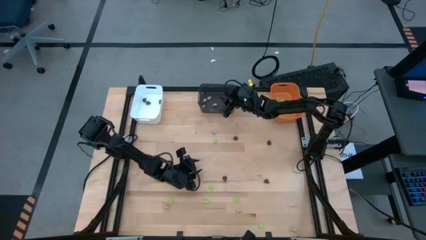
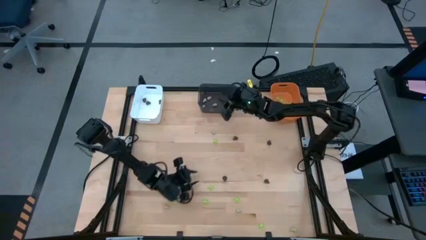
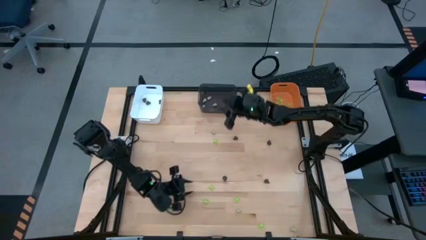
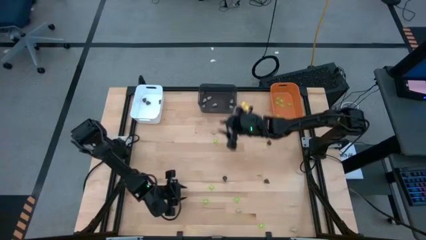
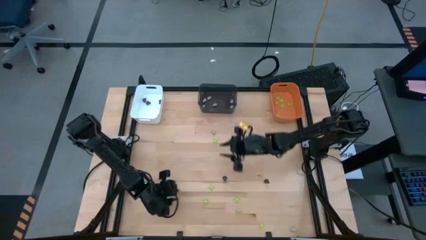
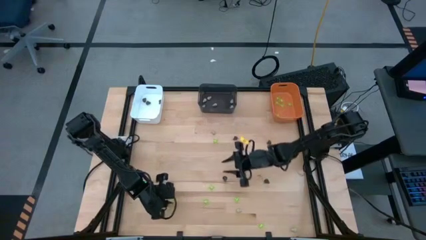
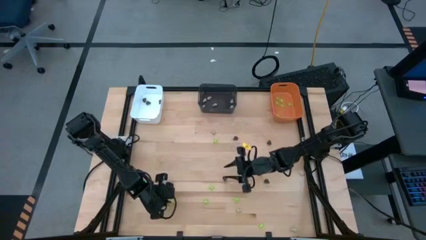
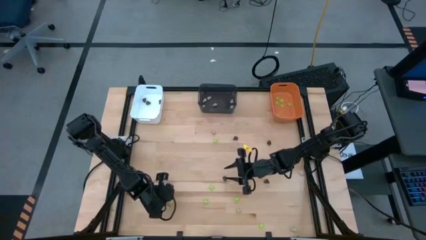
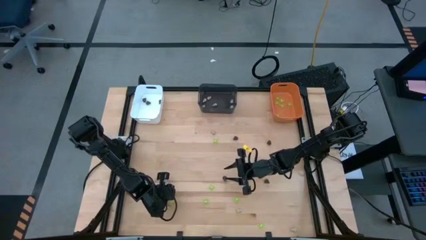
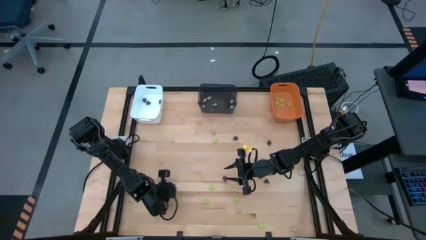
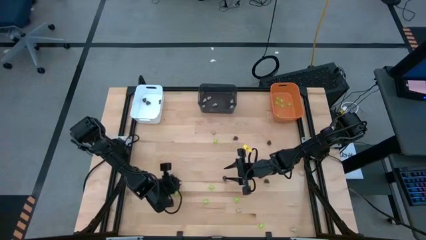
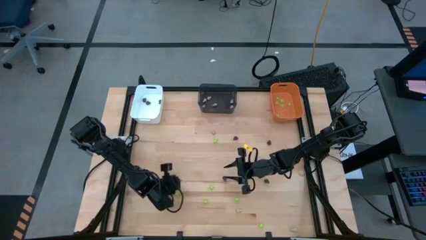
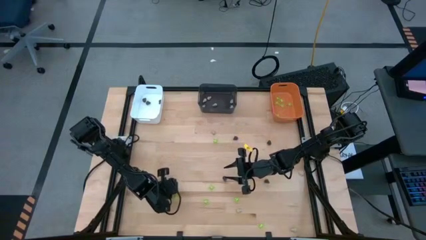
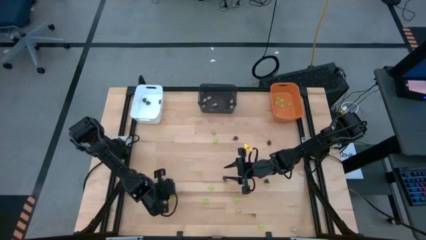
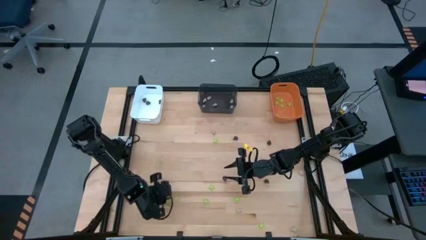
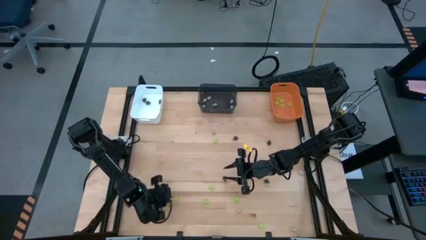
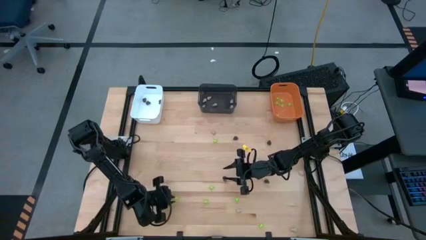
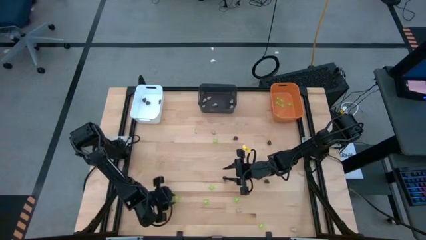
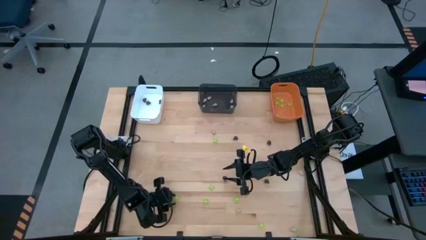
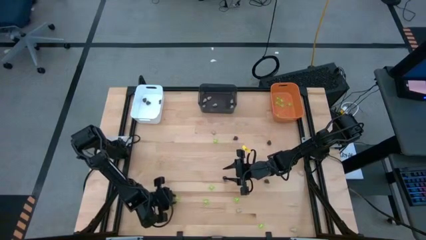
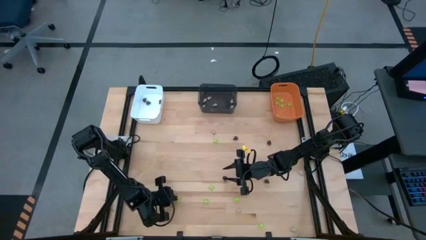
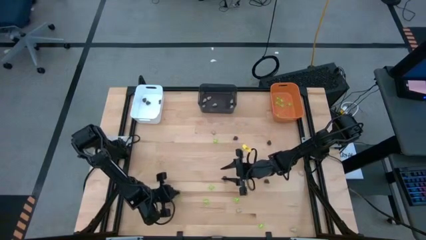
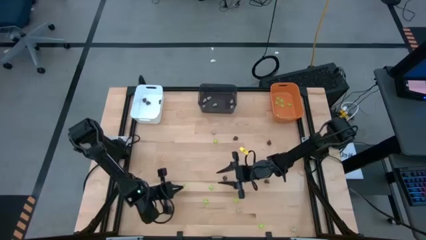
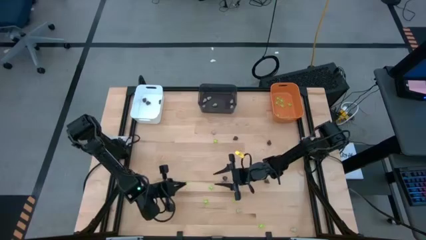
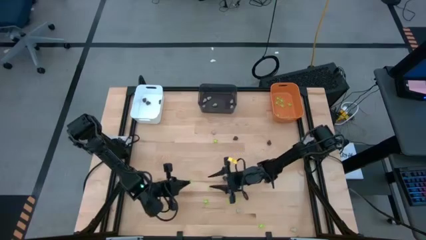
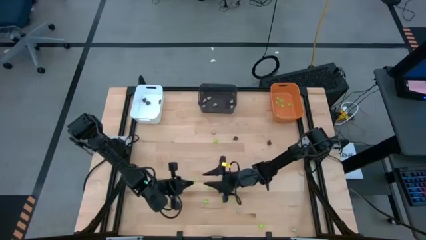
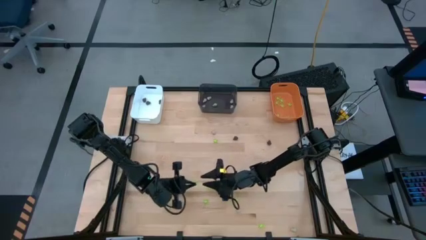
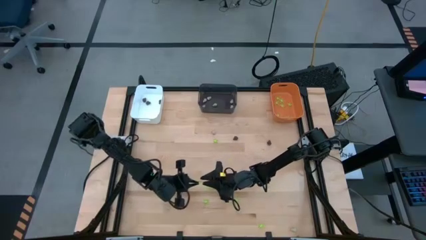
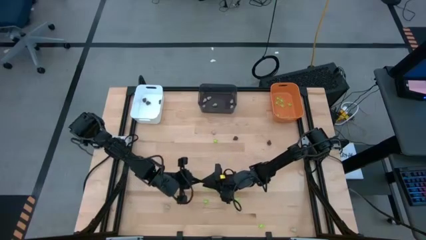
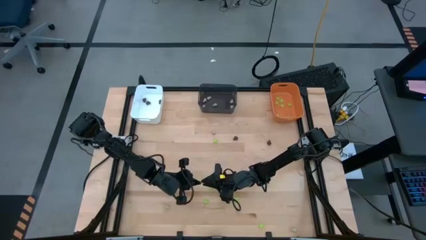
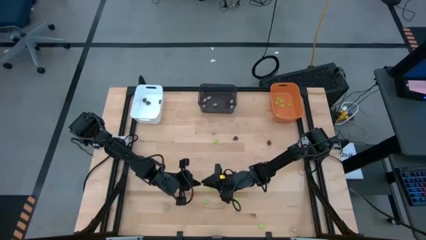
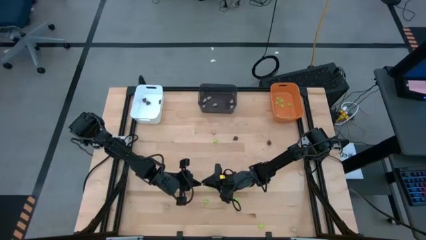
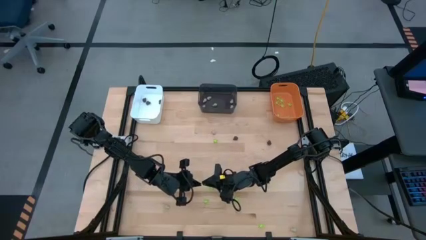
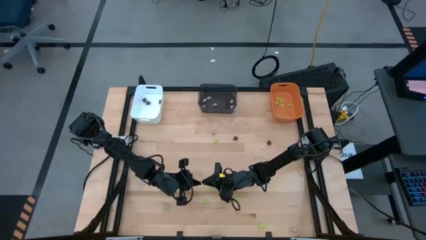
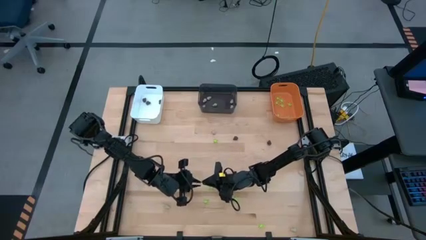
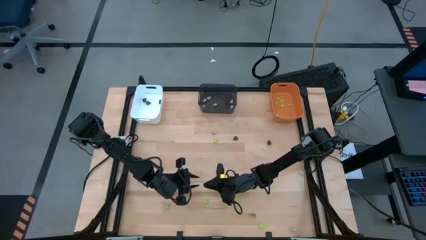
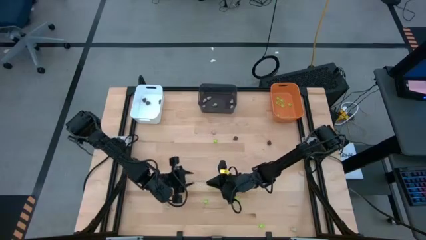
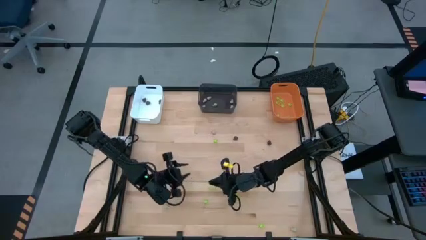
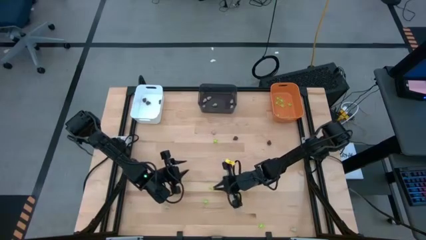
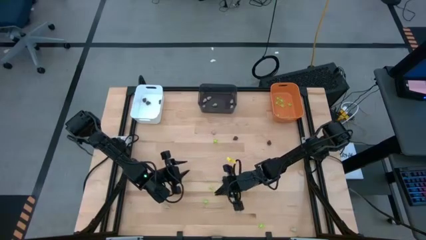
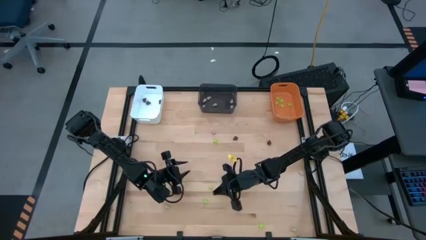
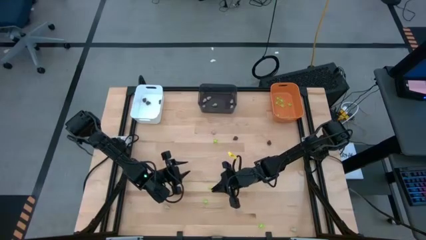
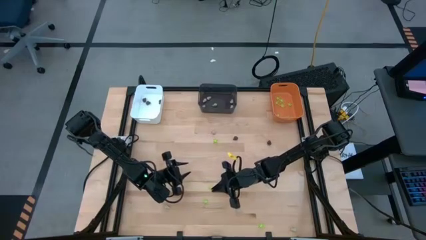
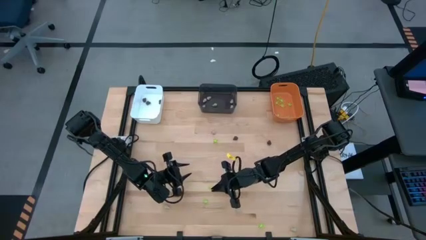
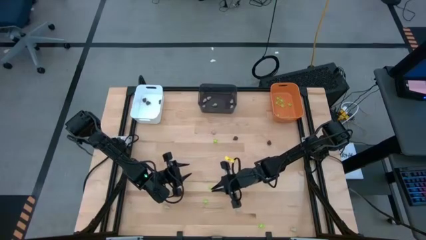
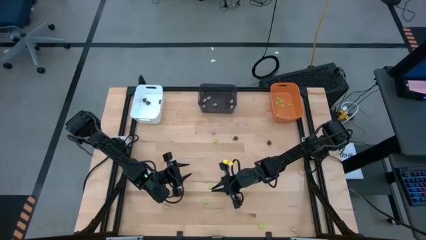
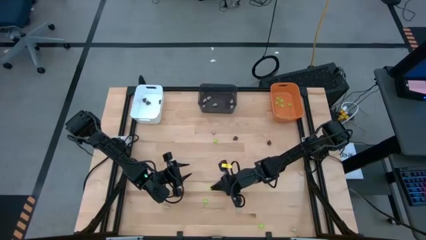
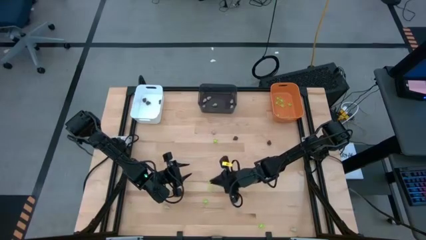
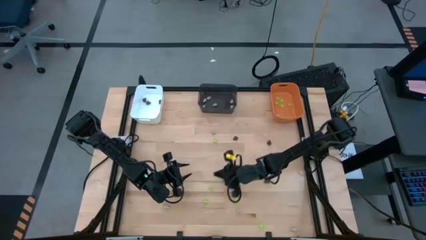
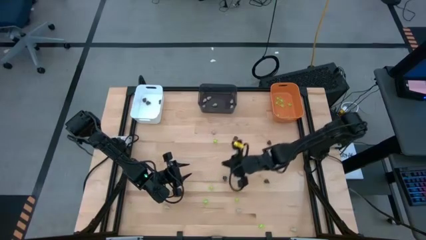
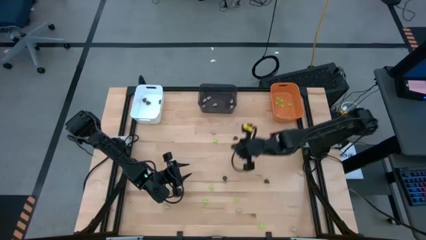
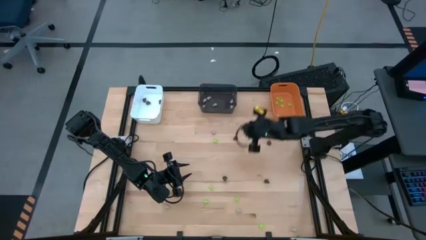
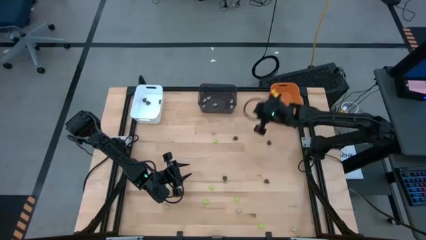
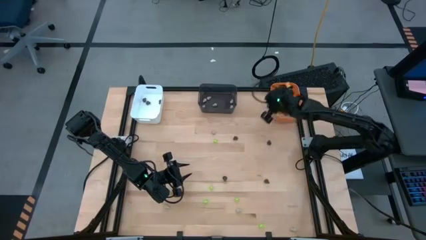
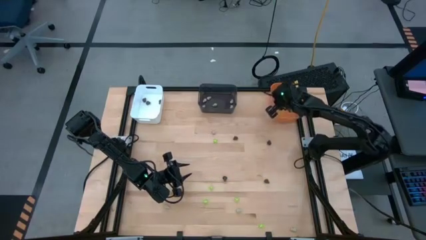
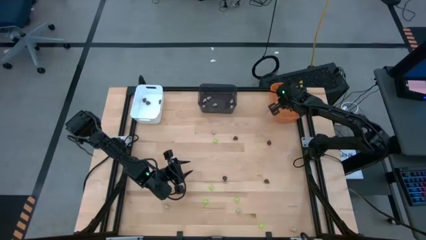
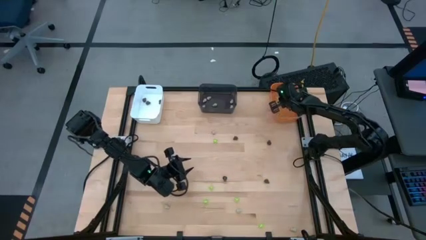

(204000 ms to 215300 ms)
Task: Sort Halloween decoration
Put the green toy spider into the orange bin

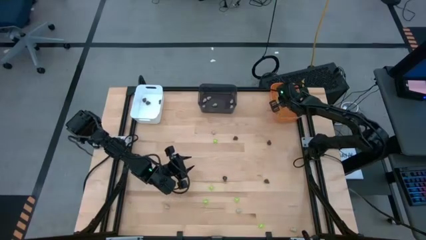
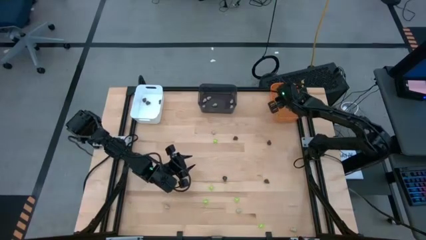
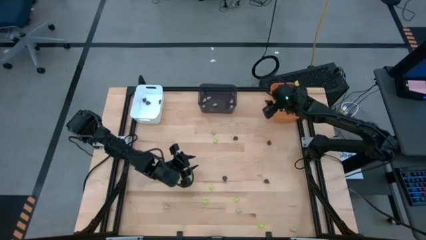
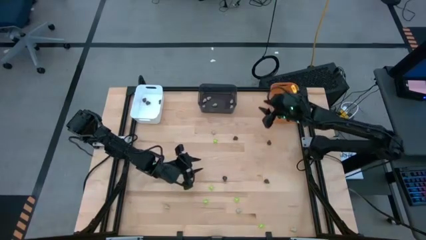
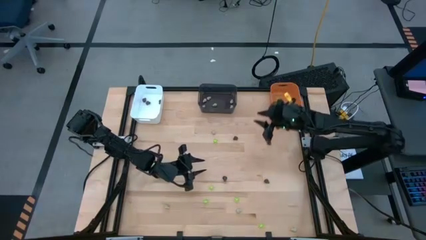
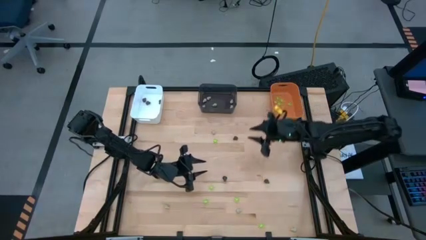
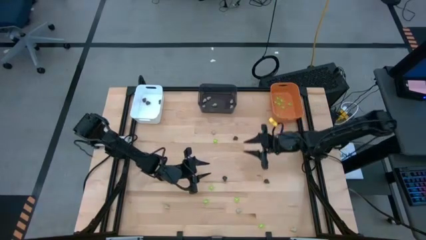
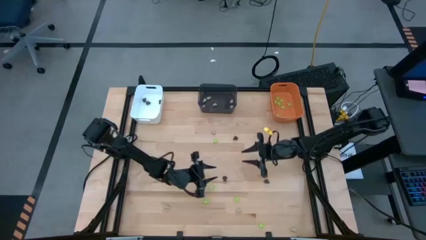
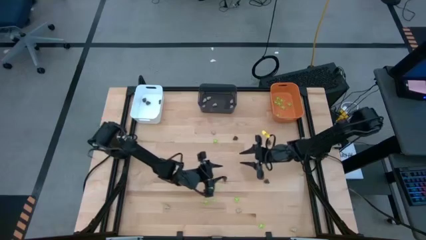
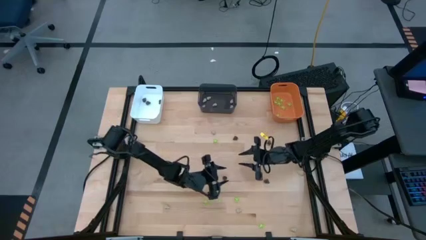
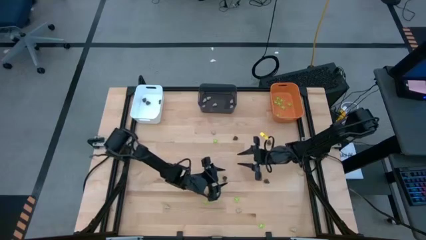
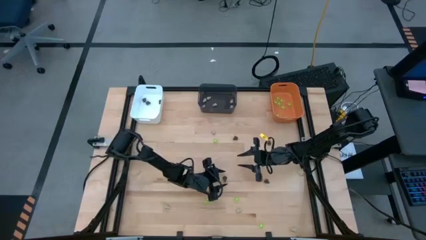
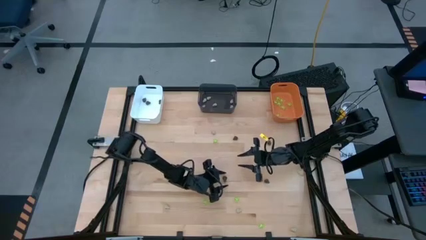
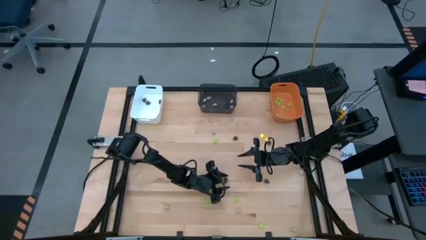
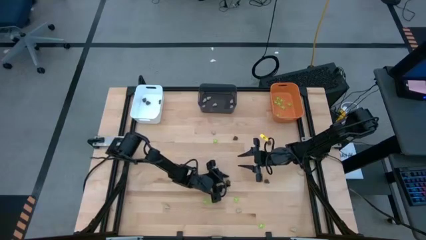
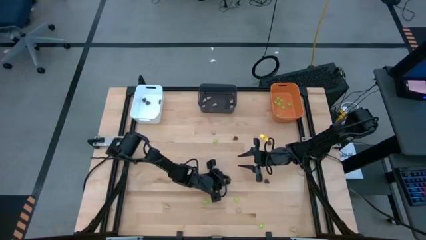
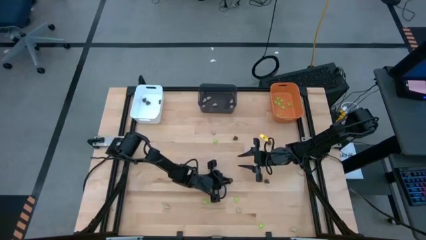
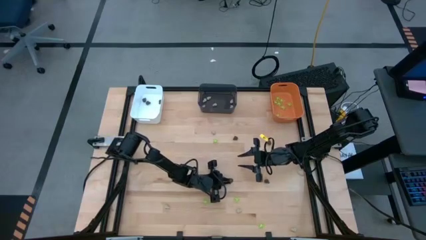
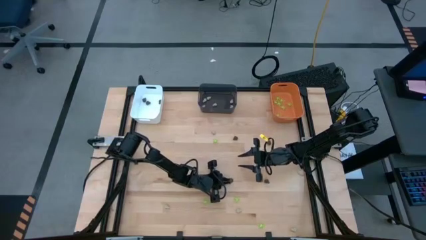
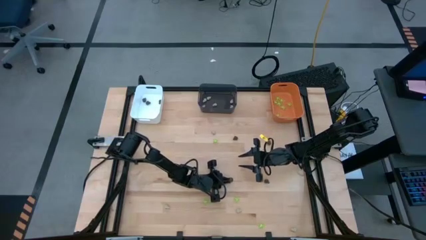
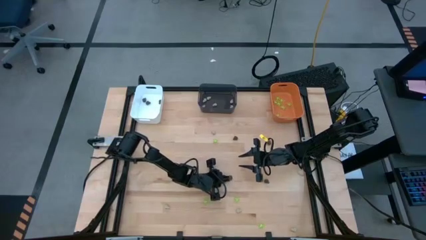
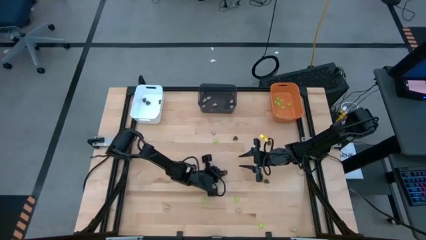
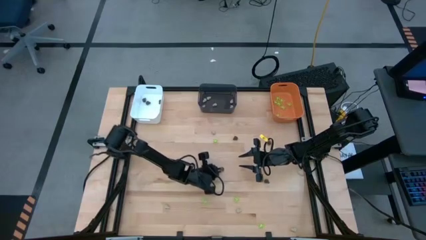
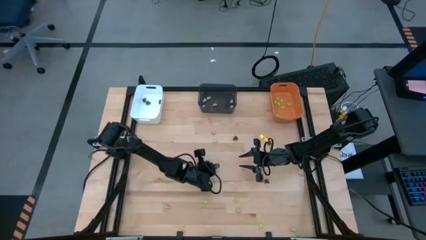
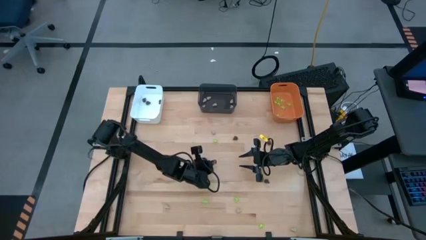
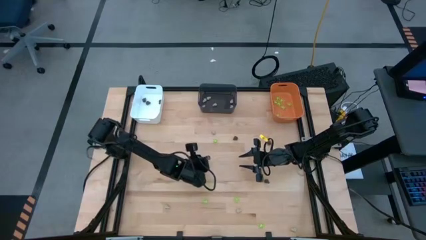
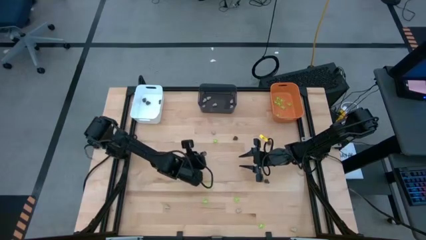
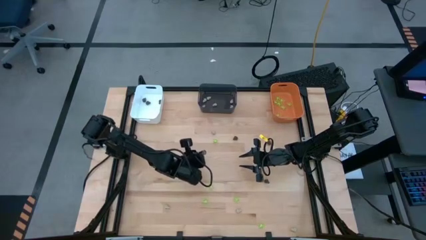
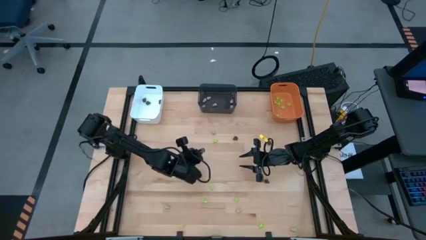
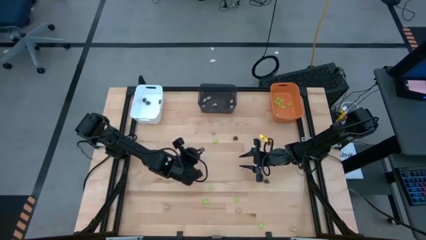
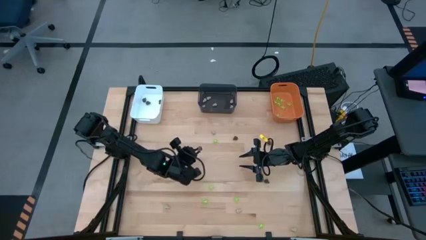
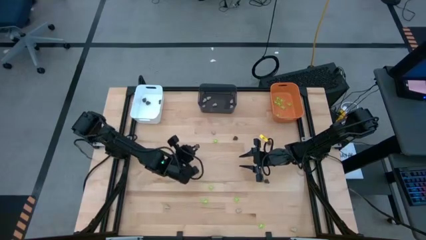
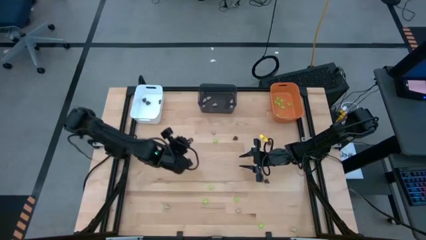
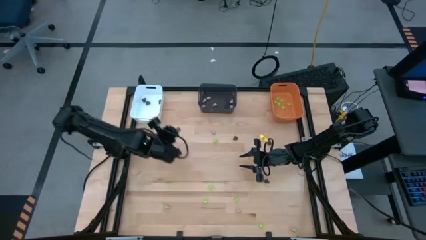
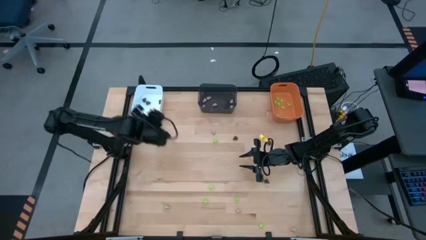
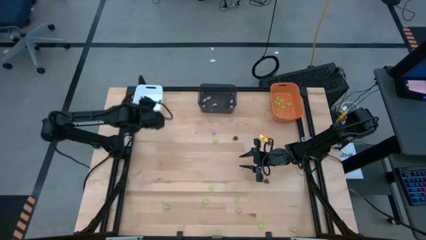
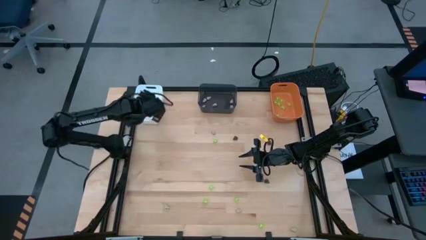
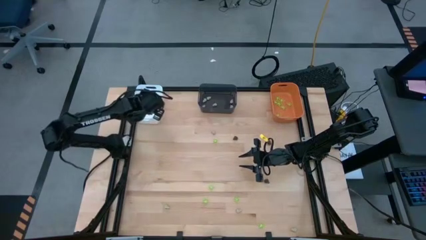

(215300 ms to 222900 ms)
Put the black toy skull into the white bin
